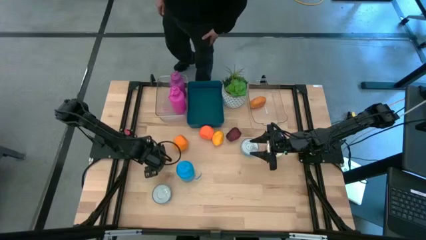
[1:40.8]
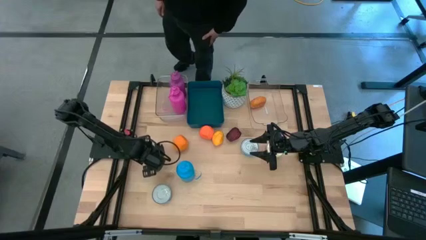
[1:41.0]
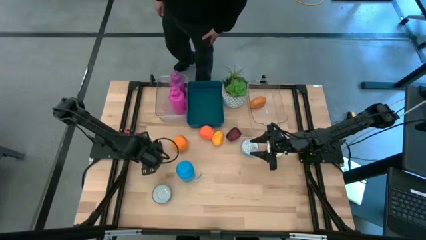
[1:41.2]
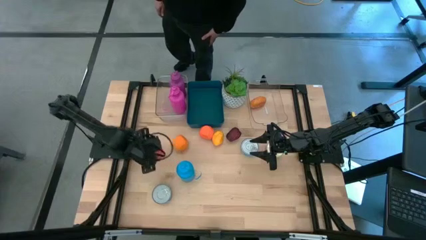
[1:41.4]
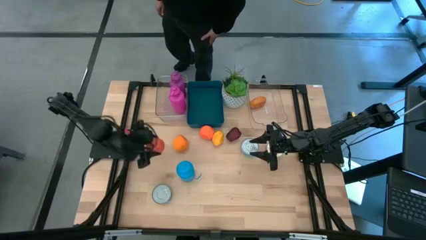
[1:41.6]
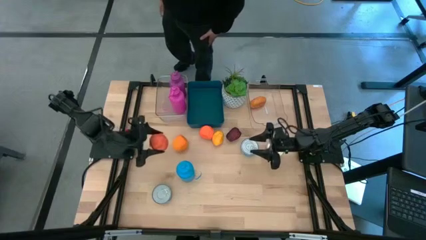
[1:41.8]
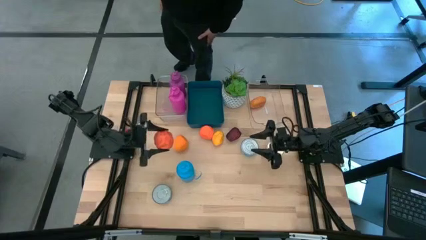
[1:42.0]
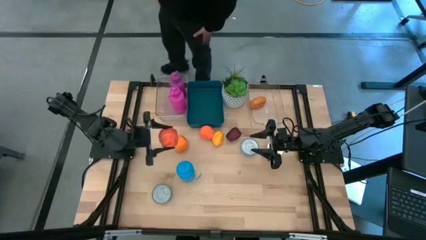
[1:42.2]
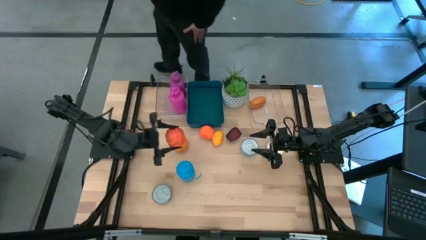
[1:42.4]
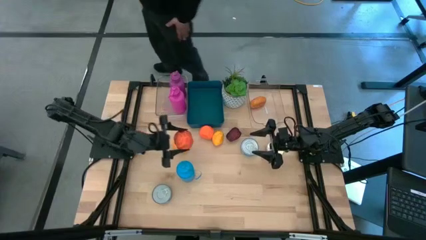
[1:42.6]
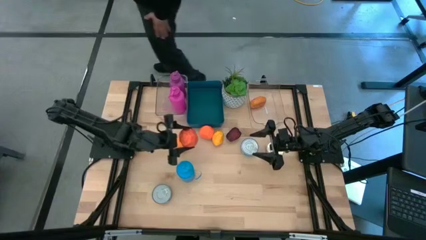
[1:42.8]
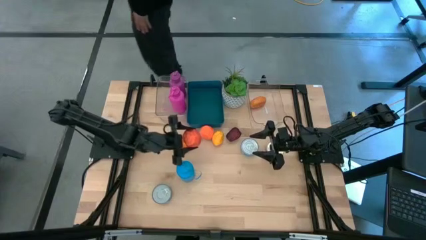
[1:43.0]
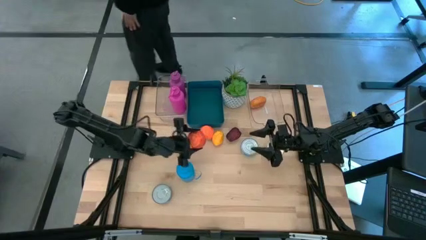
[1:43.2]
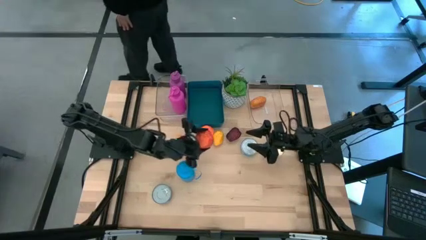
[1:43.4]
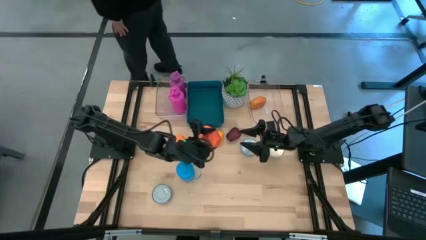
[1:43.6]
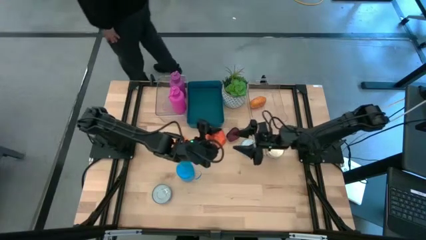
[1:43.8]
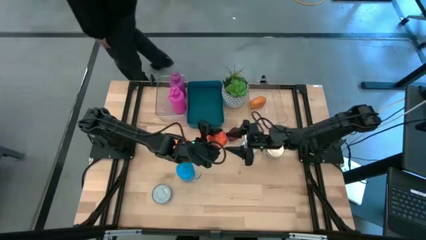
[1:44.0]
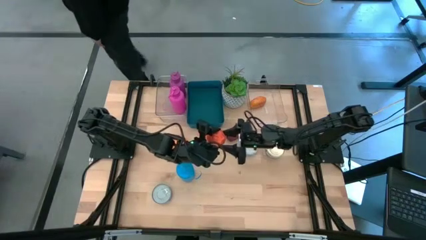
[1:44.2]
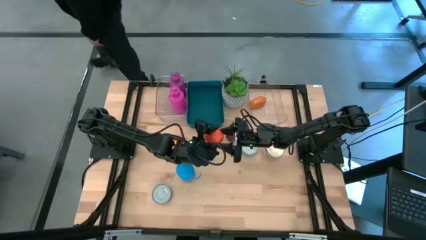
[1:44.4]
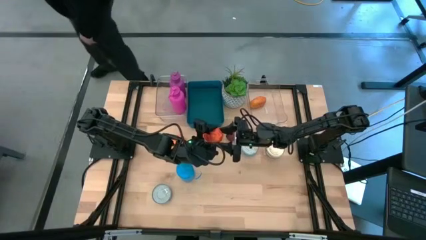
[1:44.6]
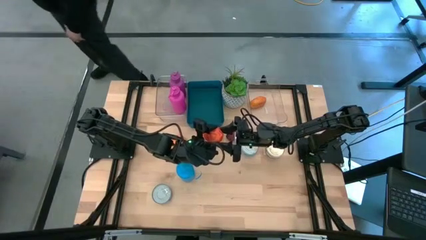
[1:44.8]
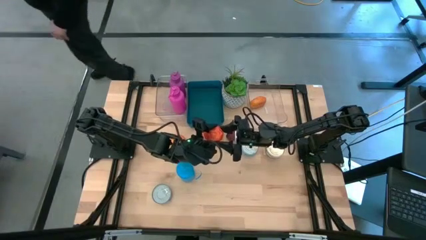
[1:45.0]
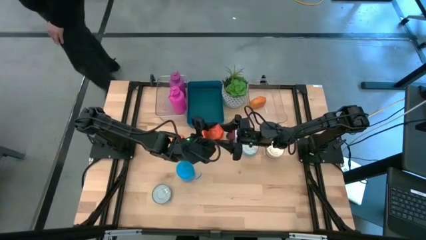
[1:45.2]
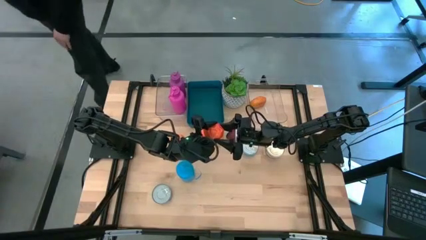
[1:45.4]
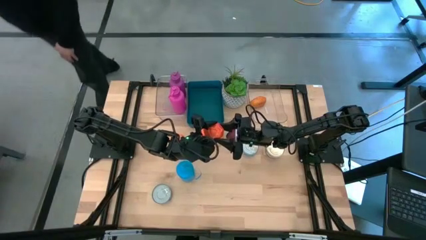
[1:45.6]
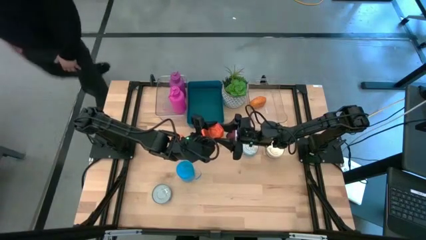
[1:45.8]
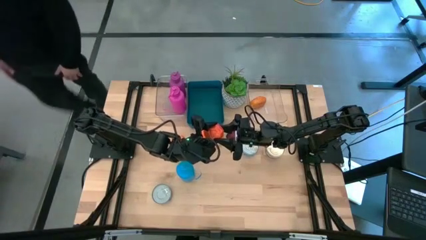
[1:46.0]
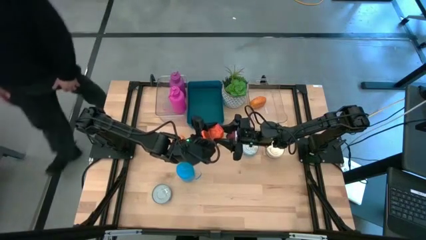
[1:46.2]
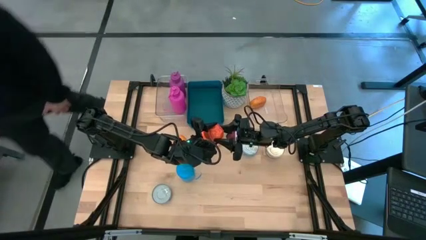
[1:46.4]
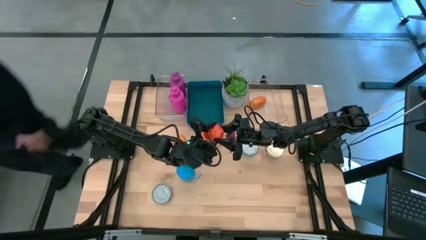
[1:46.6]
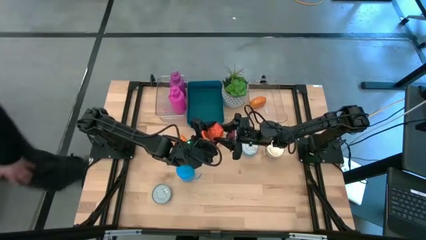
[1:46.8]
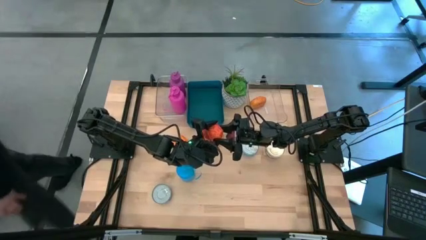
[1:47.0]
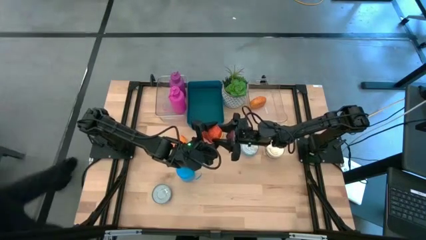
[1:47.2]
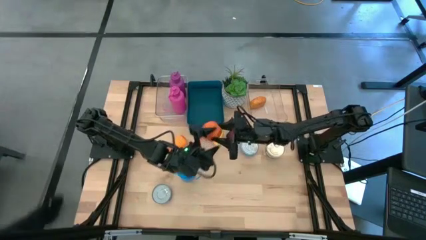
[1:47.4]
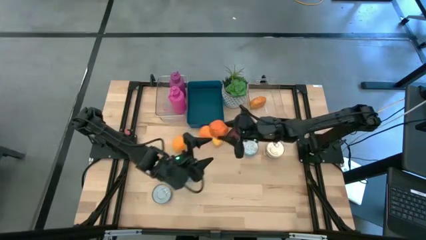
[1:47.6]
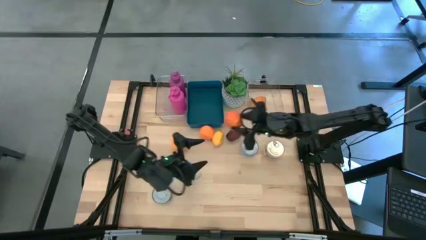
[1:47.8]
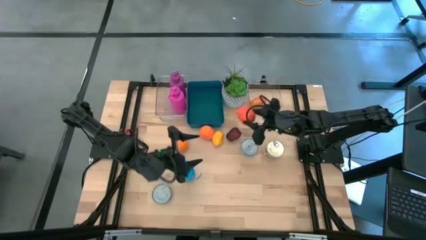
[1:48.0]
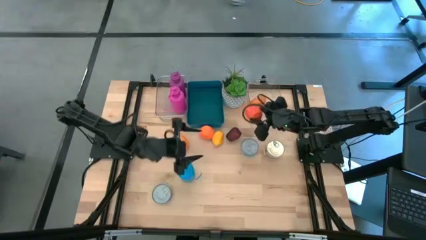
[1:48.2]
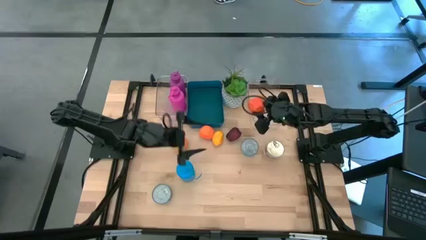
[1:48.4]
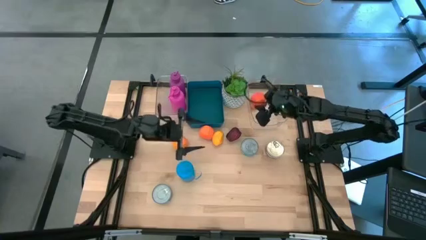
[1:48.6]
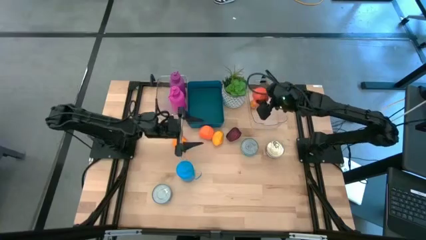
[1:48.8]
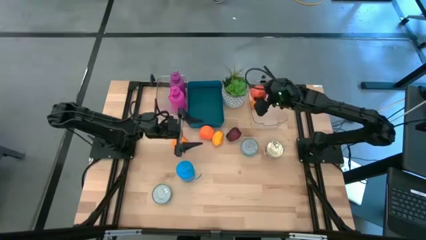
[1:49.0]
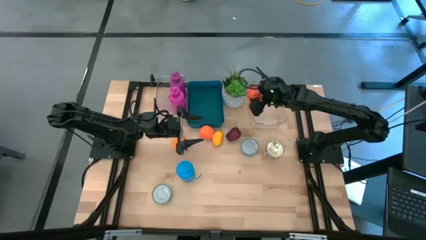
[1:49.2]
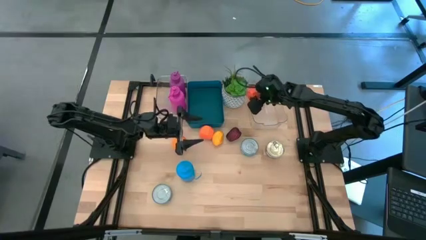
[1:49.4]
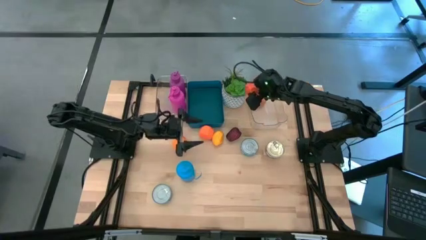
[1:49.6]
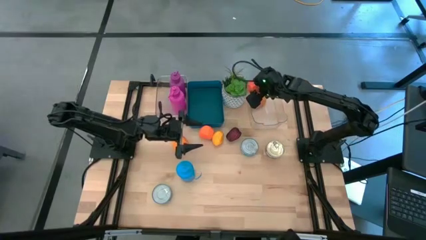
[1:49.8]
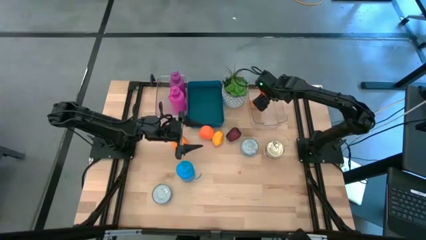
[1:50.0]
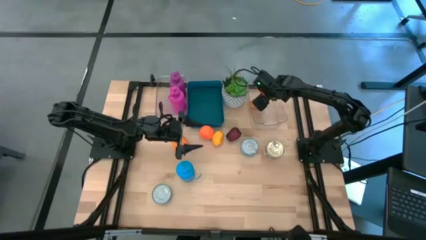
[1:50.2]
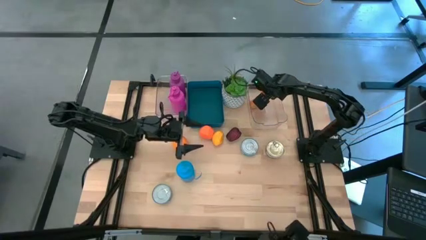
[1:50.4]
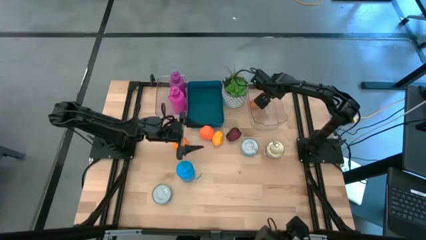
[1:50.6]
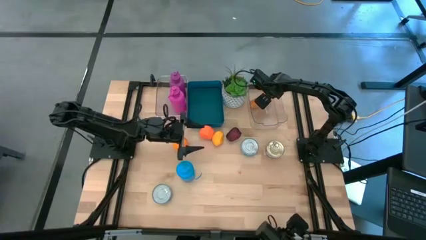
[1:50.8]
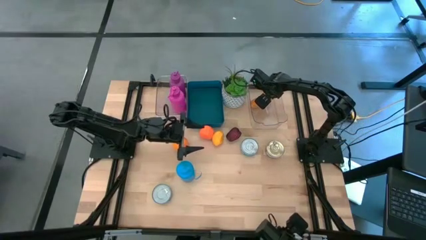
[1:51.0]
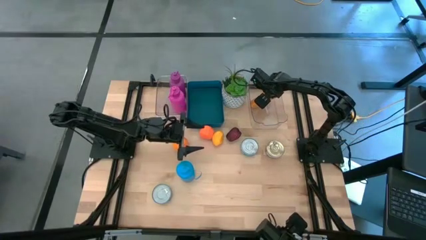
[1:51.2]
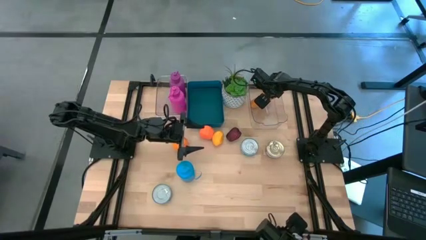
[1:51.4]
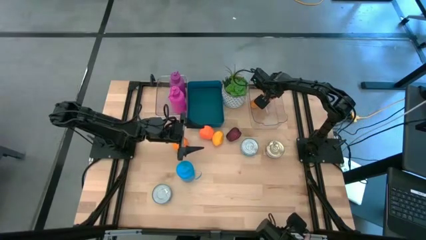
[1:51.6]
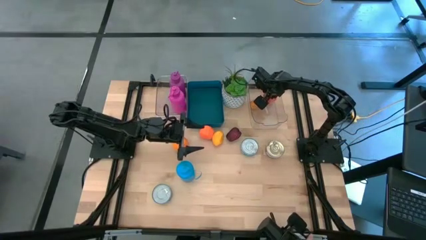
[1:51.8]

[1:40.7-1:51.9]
Task: Pick & Place Food Item
Put the left orange into the right transparent bin

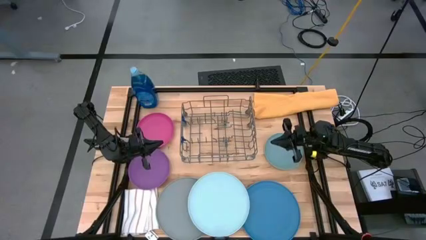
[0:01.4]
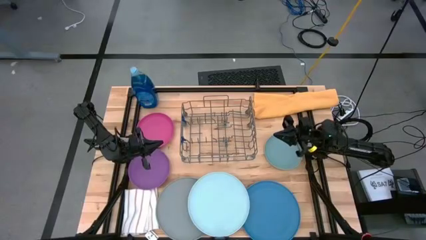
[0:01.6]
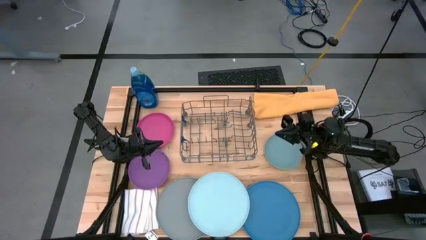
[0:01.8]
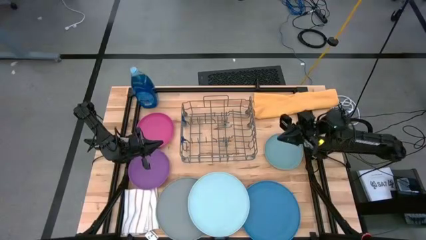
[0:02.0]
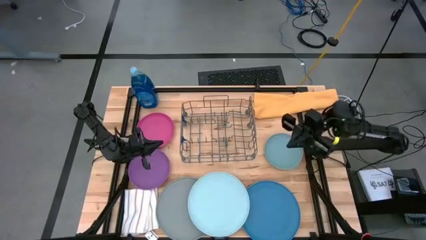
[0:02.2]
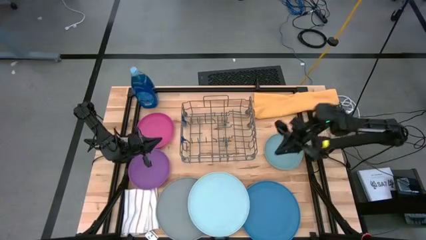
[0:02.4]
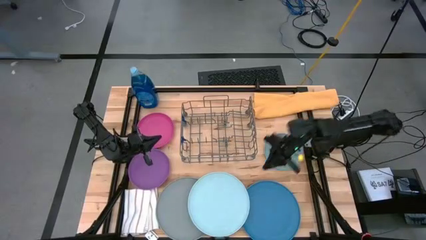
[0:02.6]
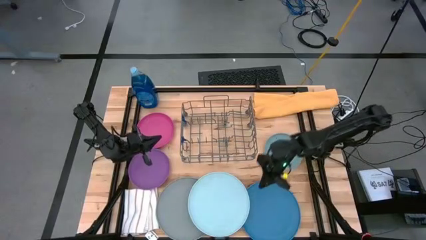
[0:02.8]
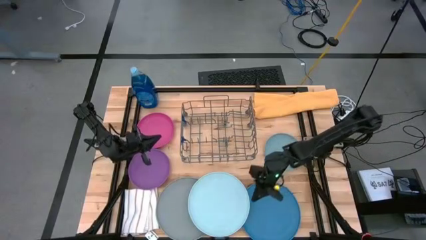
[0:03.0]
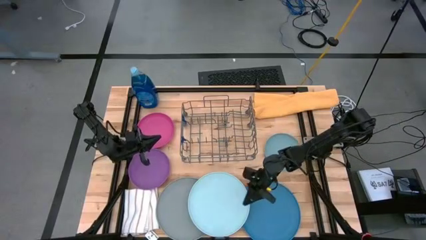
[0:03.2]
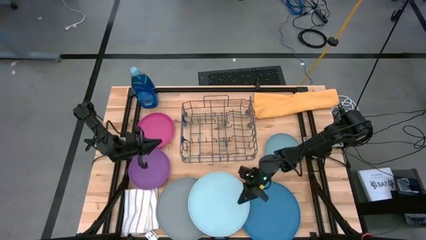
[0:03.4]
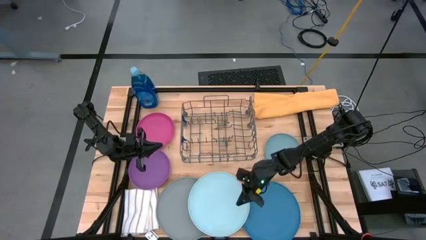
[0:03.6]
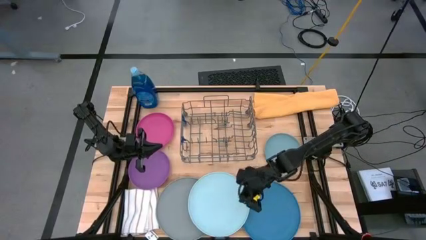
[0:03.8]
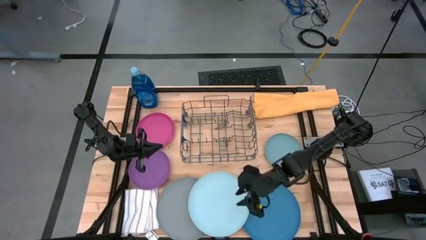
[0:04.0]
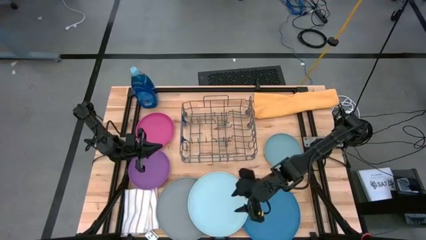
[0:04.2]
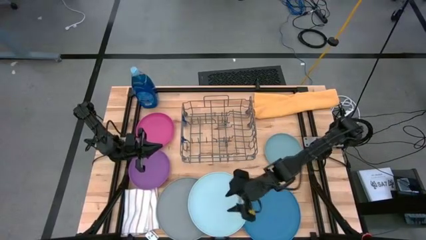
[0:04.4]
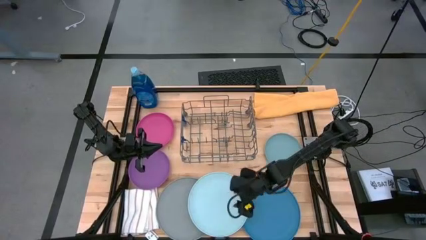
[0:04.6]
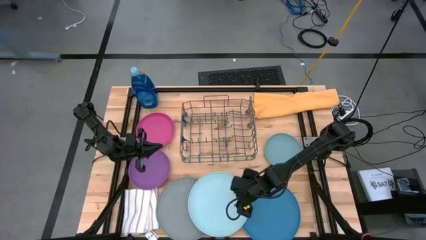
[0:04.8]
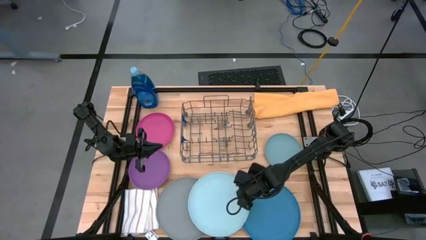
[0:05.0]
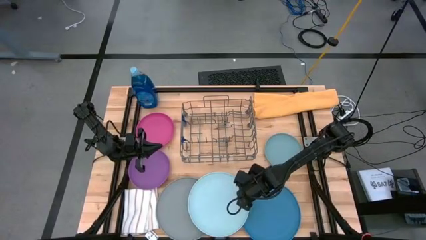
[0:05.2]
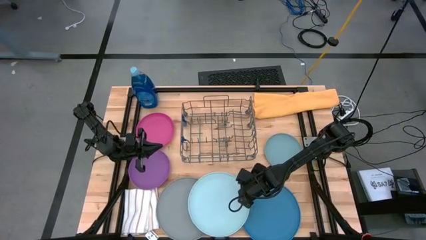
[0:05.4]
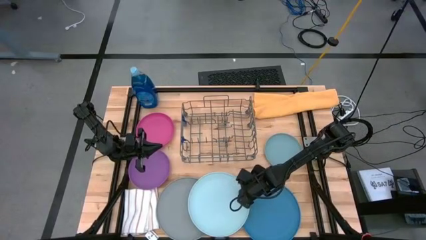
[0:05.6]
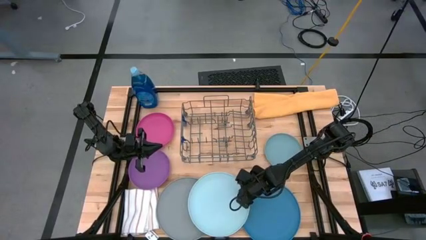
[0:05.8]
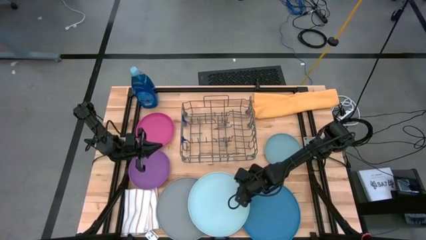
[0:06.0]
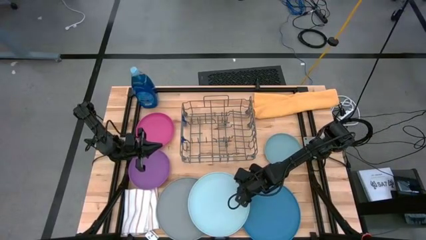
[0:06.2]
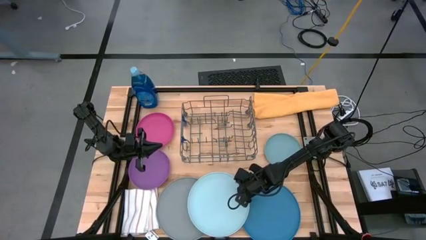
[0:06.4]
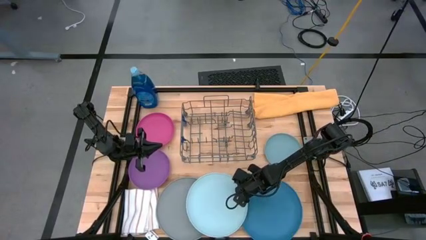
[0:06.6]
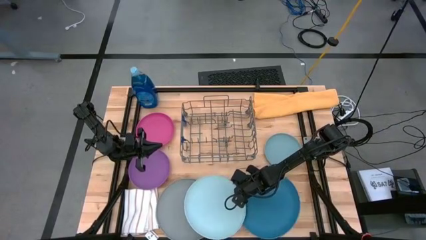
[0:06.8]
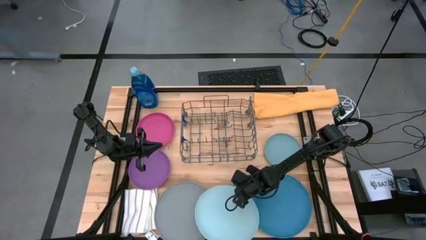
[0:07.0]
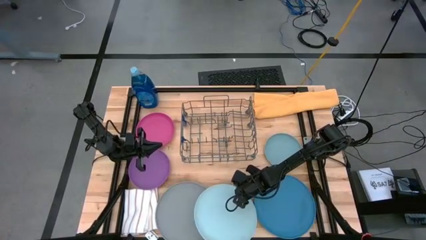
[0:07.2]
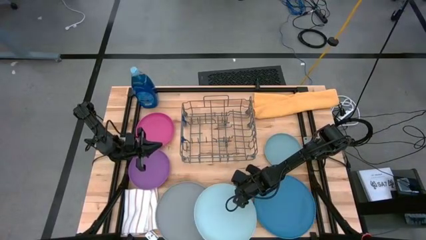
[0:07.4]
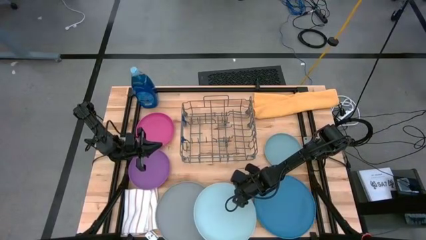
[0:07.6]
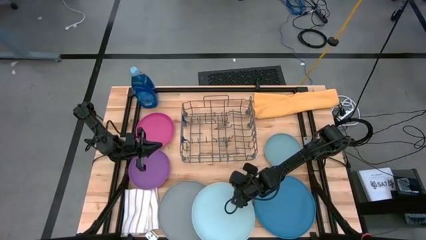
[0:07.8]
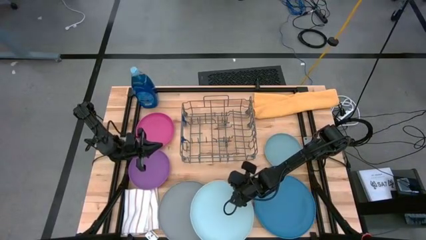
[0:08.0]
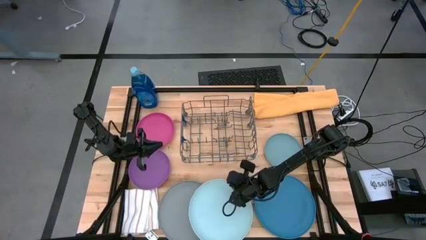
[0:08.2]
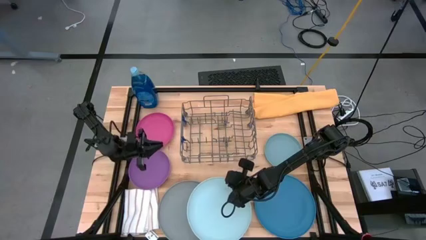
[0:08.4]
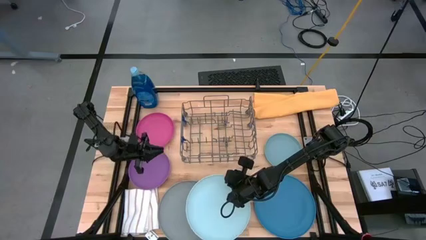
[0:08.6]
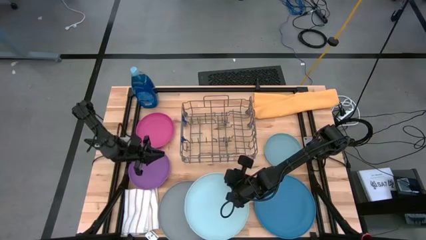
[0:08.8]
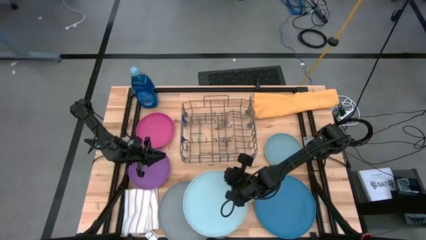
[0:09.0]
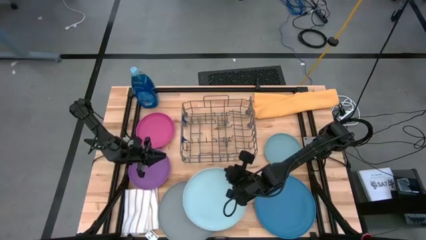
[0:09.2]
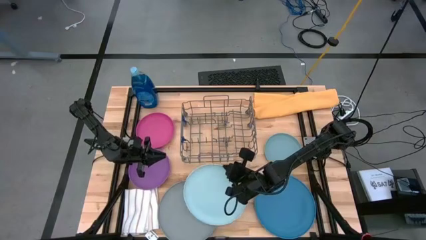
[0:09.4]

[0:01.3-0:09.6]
Task: Sort dishes
Put the light blue plate into the dish rack
